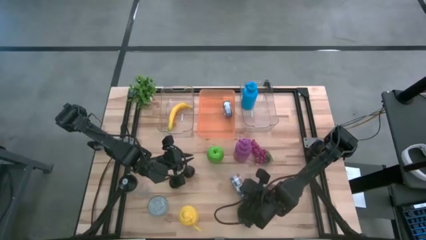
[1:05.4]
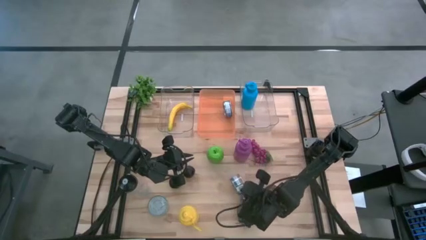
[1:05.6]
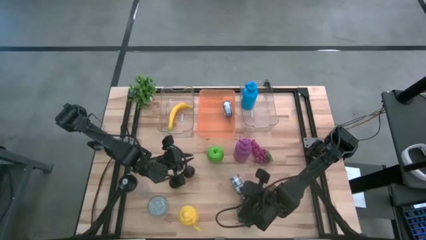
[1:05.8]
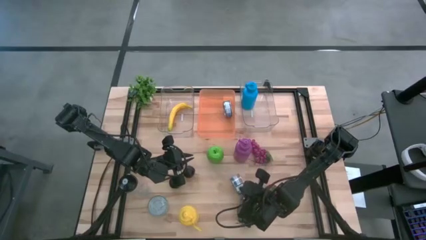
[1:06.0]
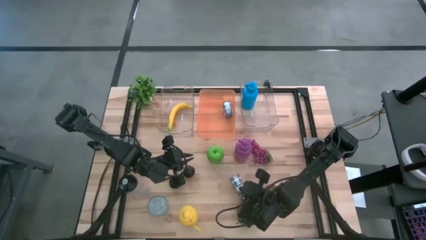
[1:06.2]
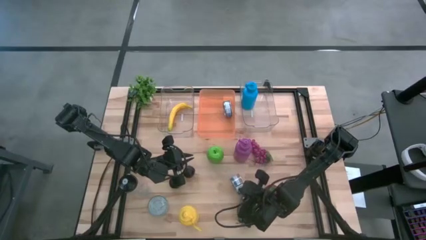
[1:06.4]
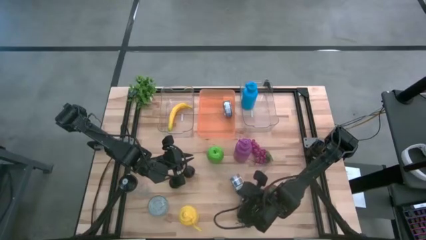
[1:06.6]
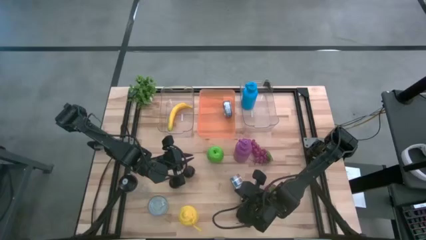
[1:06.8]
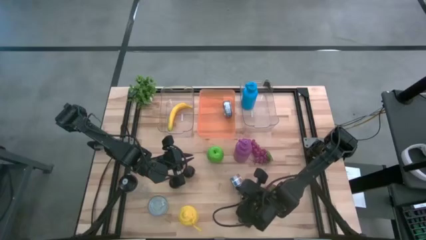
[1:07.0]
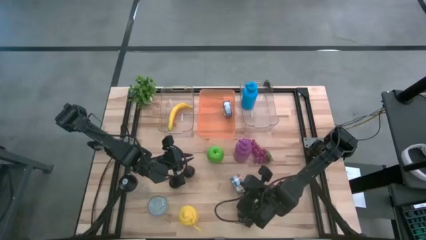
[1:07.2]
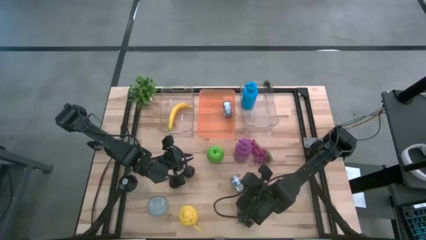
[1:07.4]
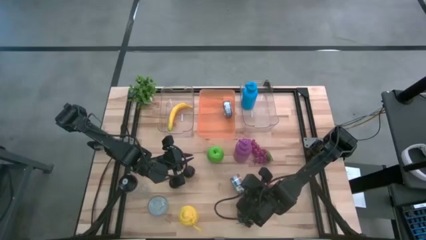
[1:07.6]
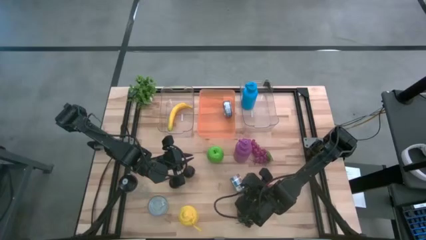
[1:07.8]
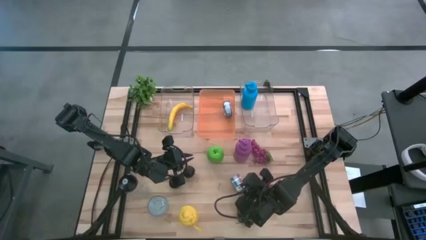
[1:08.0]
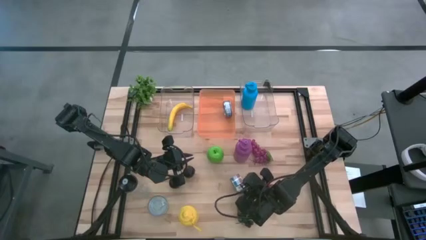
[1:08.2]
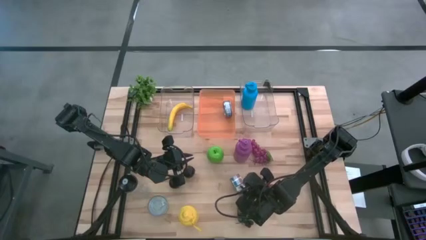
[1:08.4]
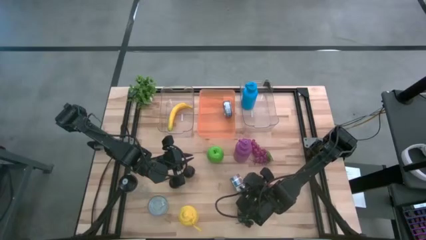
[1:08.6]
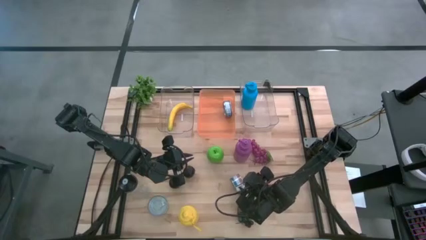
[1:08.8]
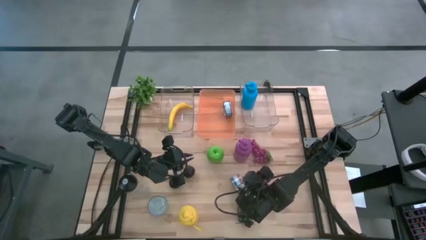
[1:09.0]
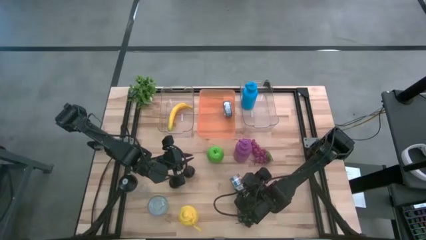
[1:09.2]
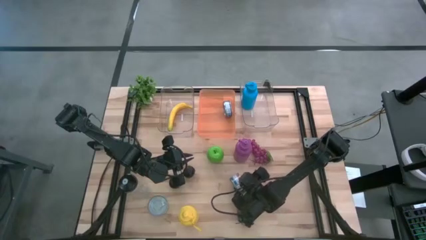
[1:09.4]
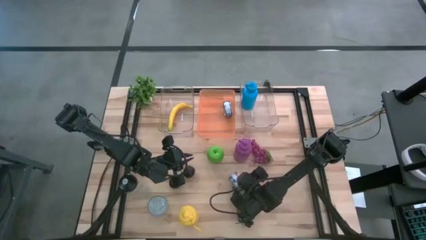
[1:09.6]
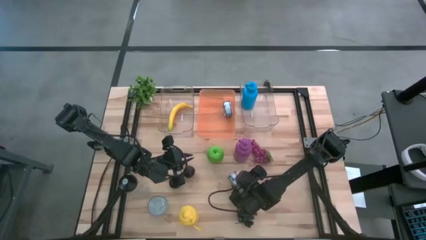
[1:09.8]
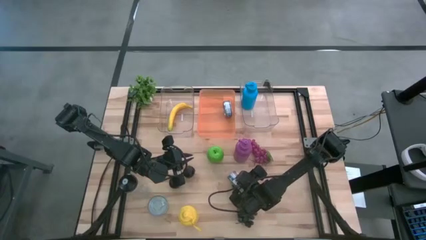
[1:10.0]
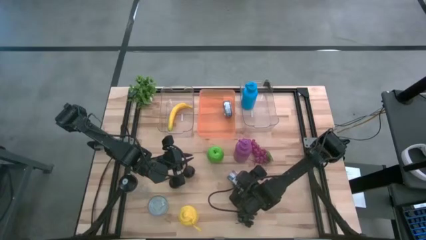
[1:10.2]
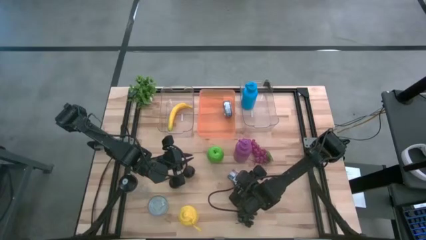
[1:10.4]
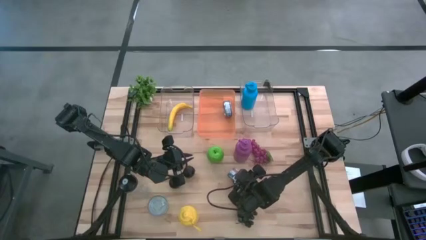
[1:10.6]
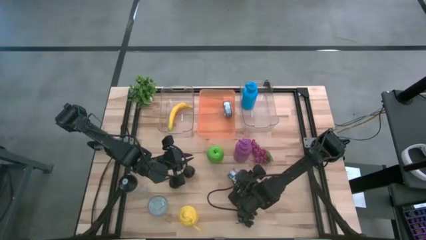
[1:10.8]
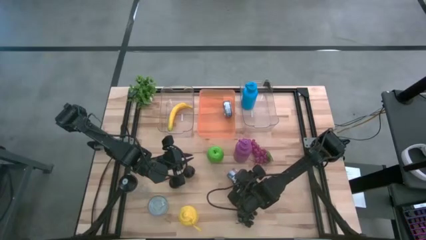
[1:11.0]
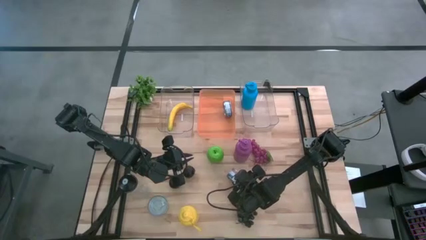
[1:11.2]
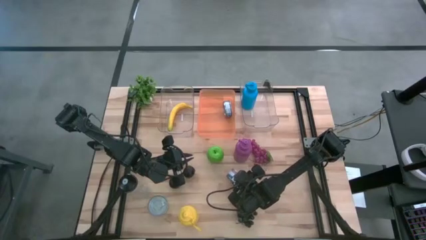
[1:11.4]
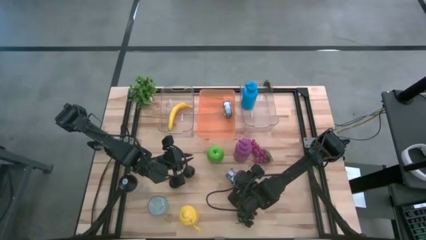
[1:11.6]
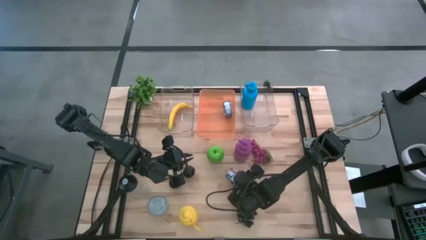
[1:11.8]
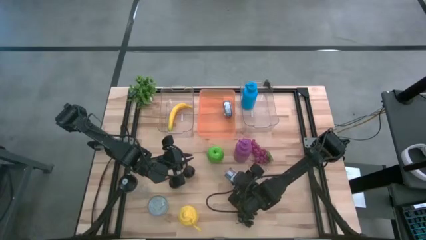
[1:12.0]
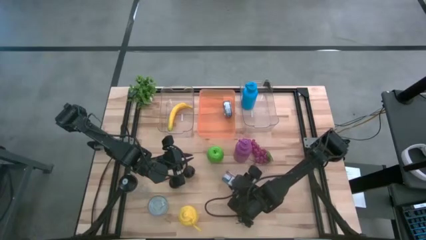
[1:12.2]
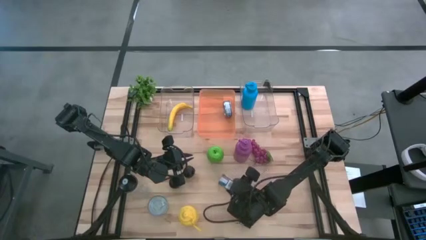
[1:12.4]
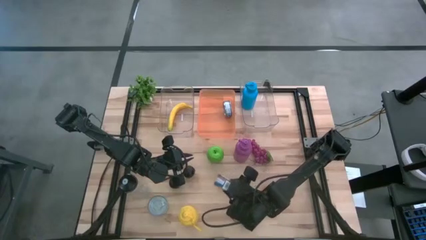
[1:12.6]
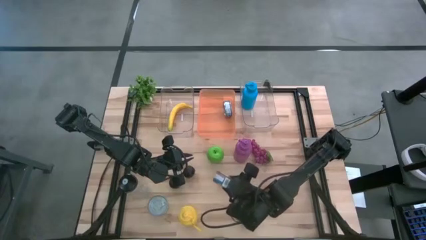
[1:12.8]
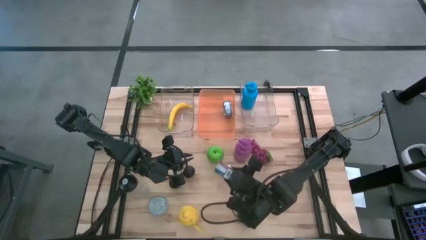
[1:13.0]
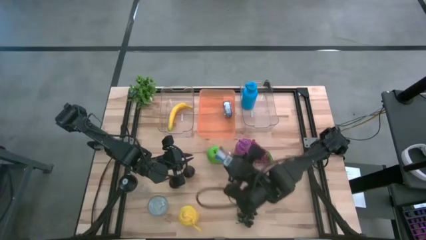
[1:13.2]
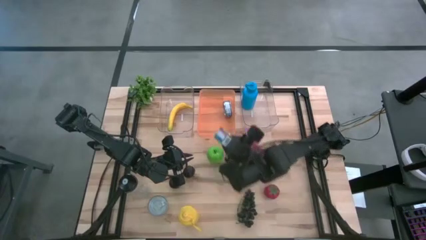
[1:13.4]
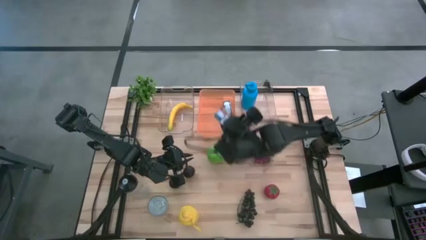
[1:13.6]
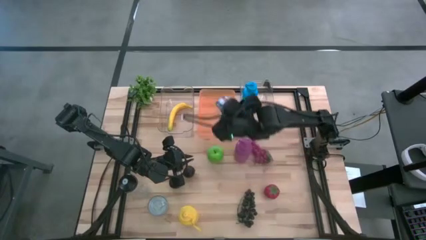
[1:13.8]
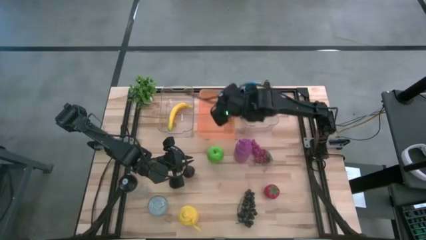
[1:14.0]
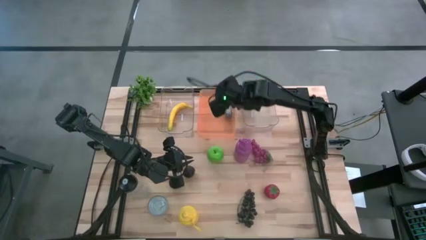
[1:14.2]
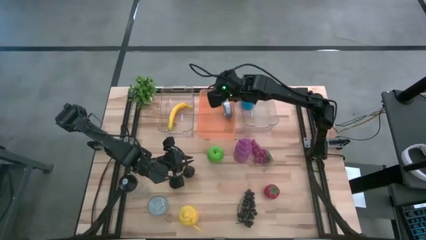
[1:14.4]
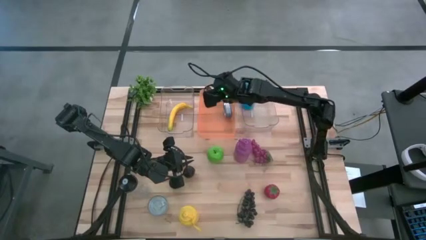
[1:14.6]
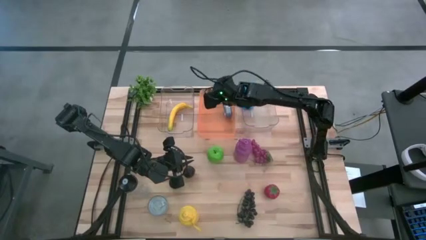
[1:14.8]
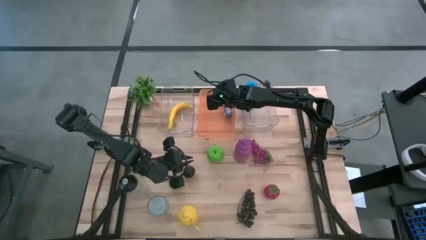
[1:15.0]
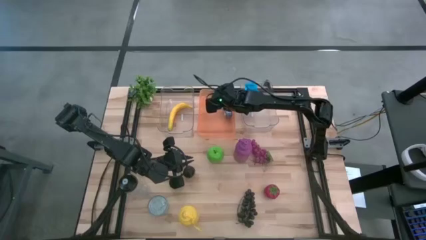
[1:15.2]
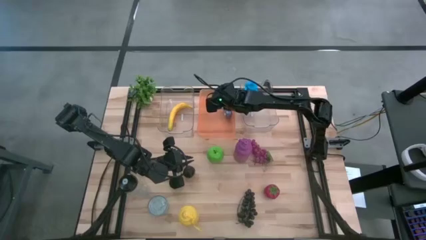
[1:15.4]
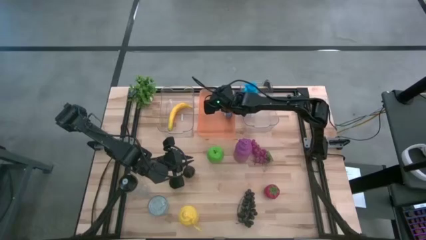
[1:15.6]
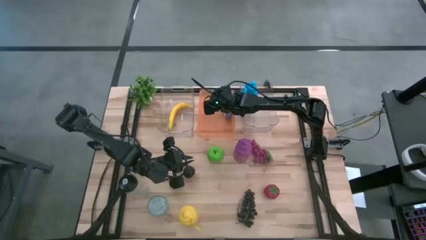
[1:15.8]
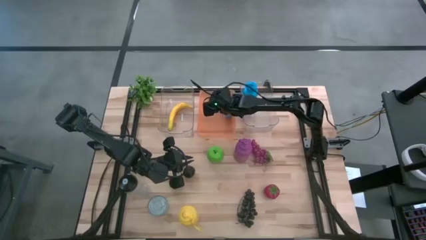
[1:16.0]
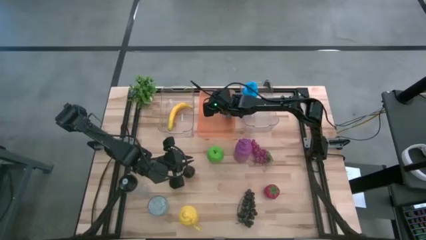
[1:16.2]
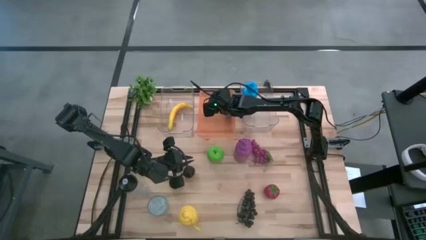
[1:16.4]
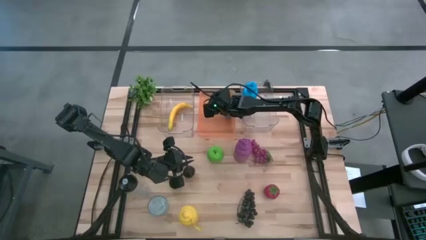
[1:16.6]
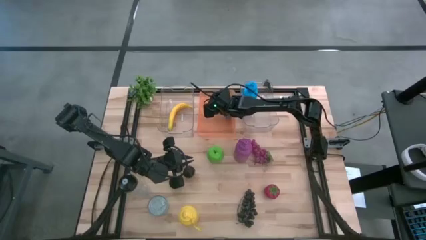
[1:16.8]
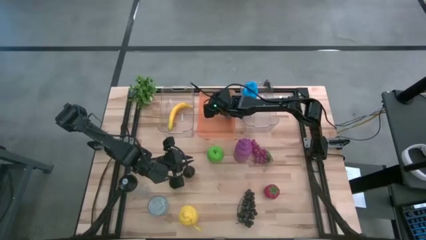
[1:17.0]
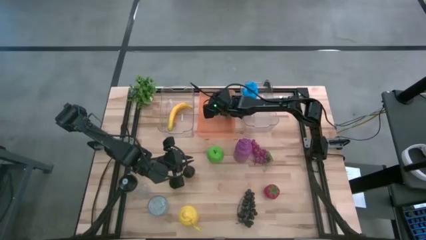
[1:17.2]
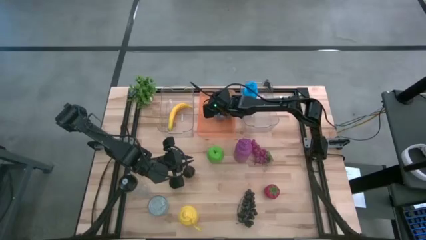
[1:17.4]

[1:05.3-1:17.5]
Task: Pick & Place Food Item
Put the blue and pink tuna can into the orange bin

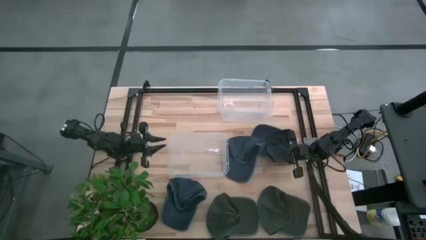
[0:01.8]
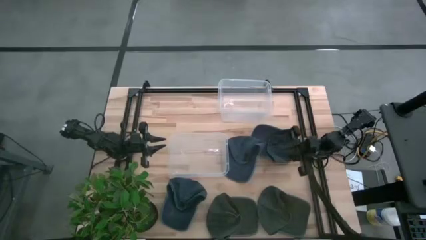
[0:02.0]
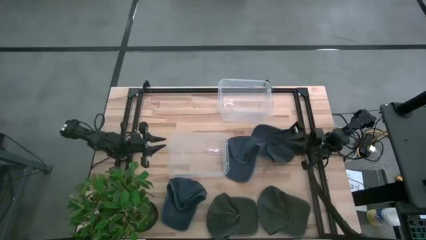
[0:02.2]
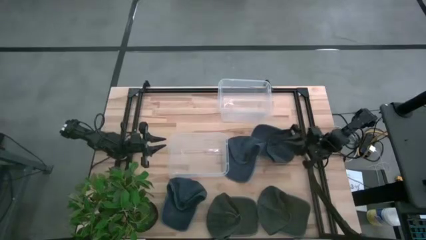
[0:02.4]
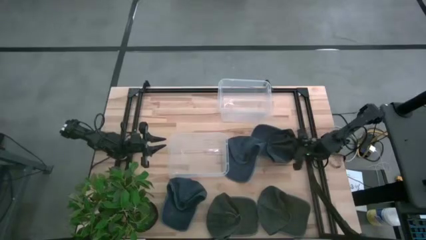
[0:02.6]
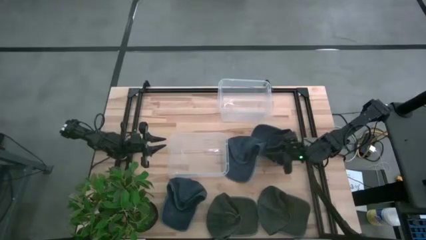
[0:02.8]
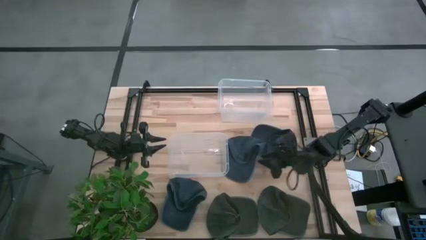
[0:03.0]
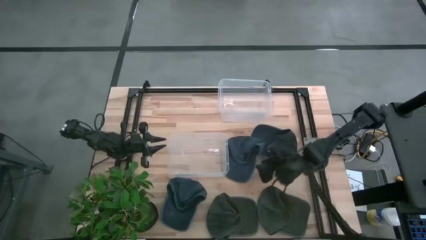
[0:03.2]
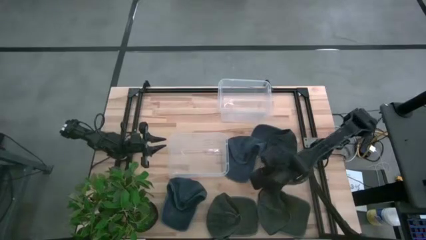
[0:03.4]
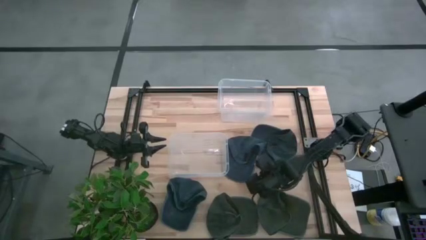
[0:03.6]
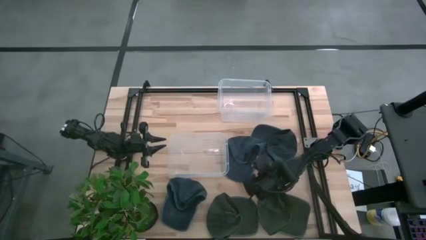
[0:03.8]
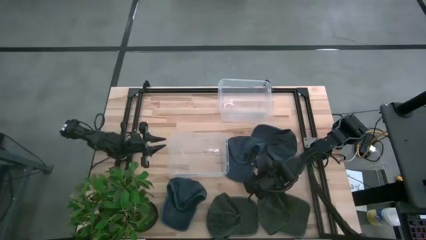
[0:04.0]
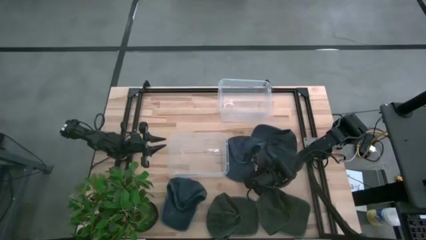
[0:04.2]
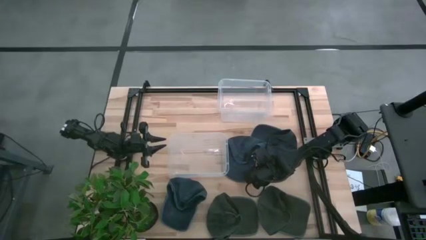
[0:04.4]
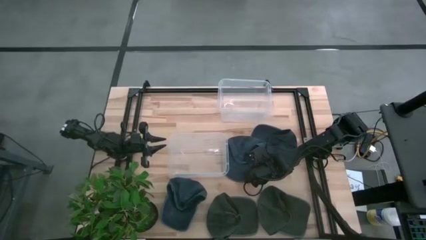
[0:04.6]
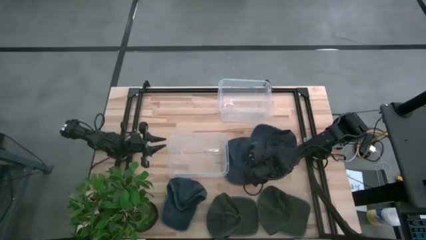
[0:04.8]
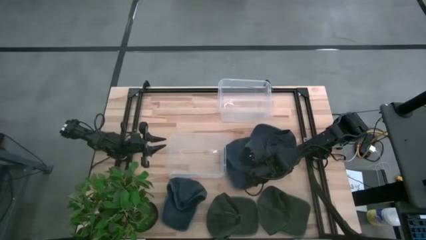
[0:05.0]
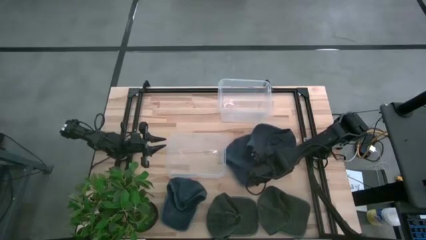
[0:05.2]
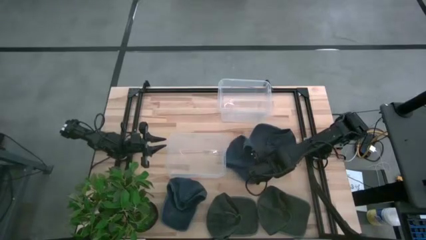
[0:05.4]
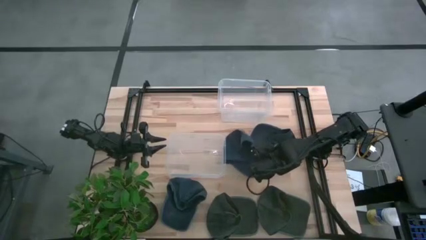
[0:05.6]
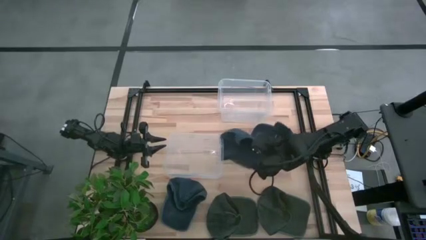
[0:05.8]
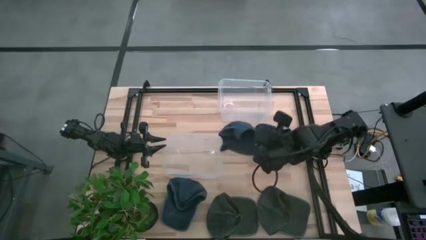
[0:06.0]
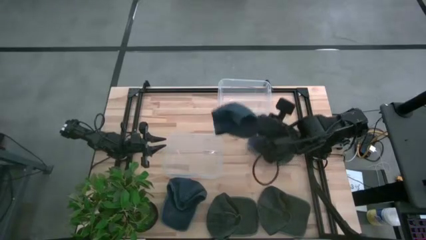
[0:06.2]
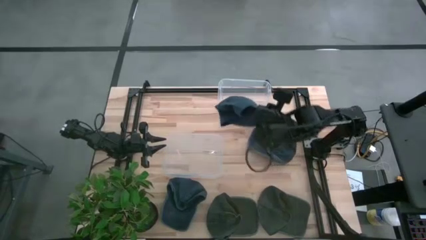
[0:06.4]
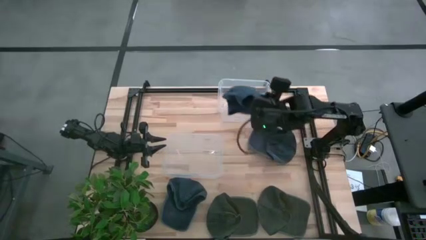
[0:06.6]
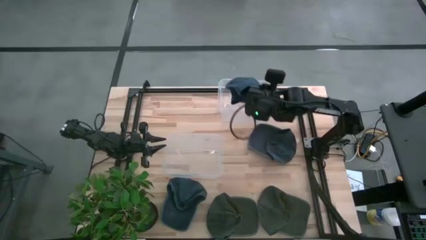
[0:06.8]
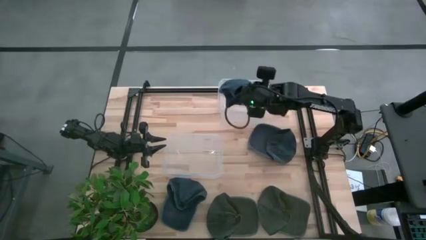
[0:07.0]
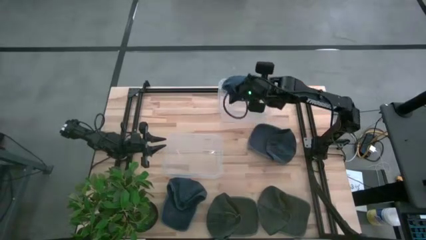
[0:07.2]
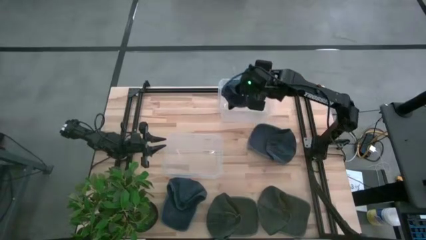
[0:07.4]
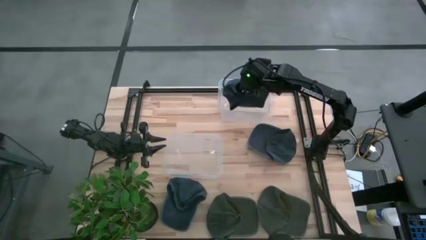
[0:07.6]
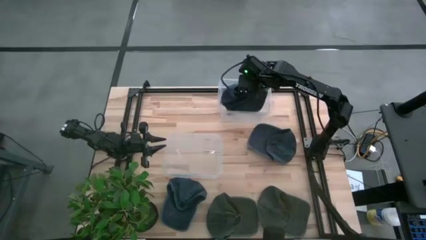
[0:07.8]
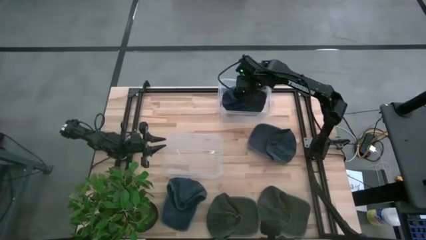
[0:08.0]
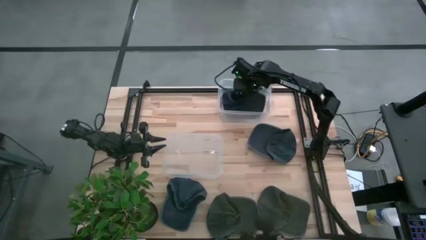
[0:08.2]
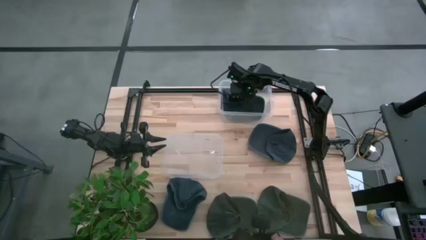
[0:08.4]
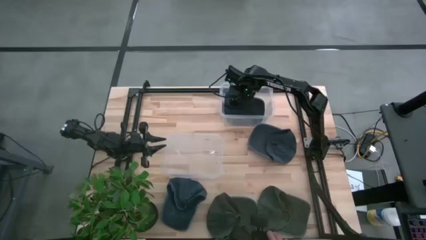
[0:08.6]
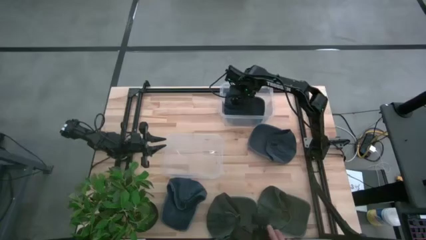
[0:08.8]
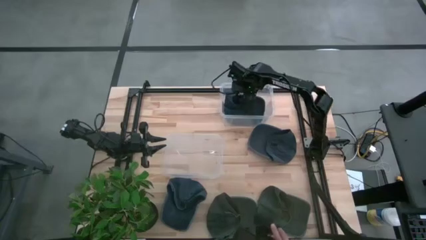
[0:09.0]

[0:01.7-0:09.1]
Task: Pick & Place hat
Put the middle blue cap into the top transparent bin
